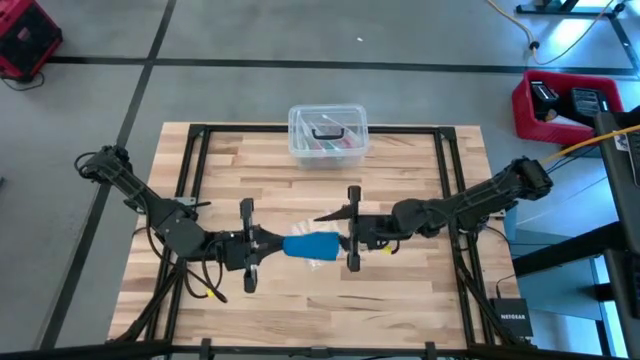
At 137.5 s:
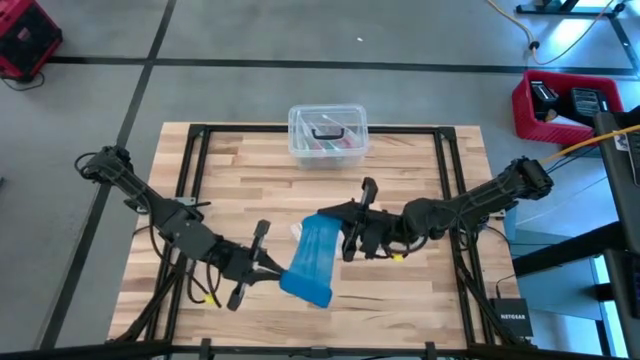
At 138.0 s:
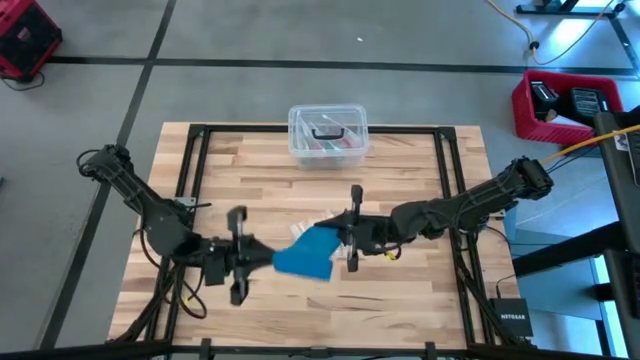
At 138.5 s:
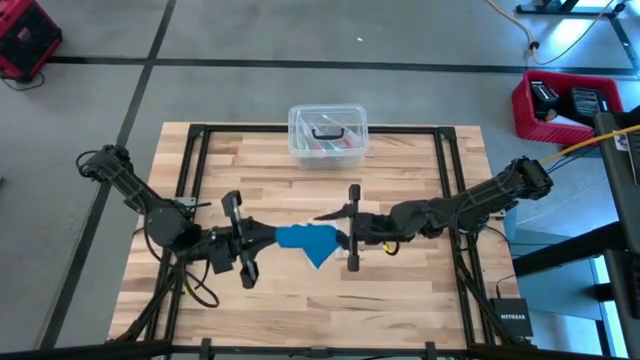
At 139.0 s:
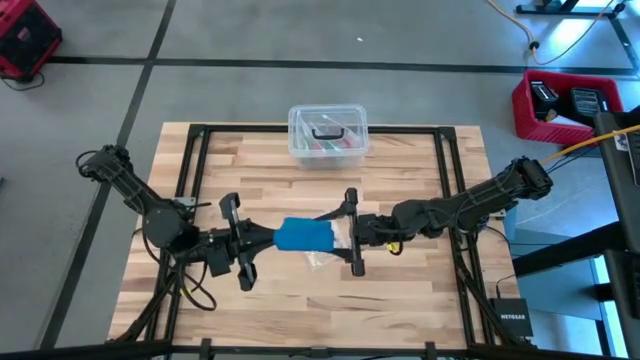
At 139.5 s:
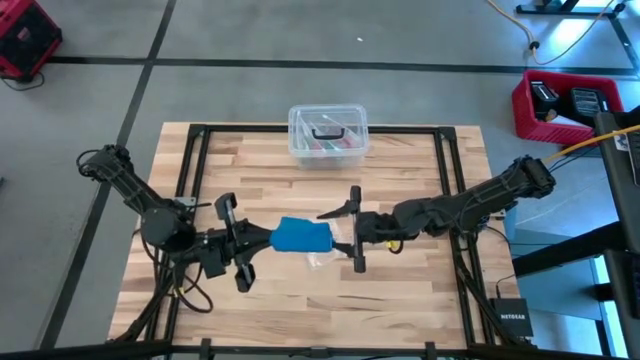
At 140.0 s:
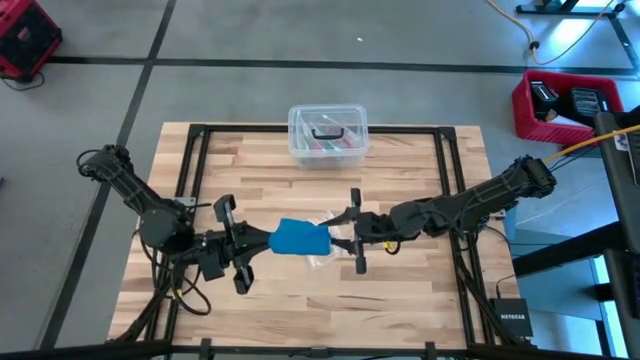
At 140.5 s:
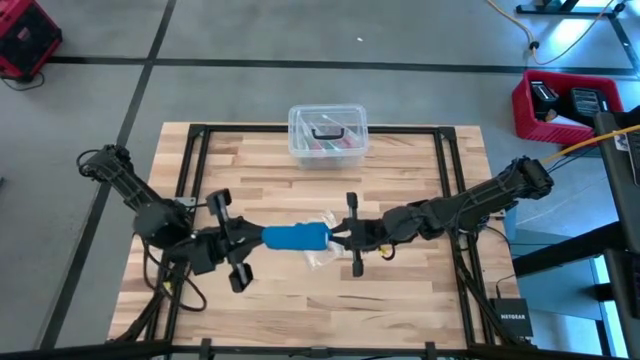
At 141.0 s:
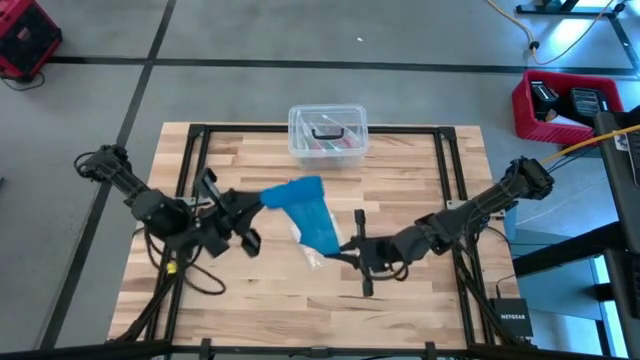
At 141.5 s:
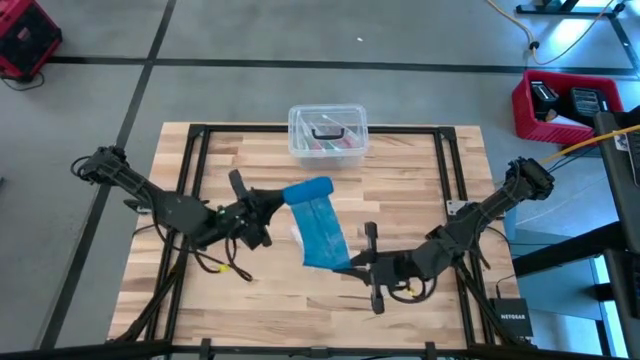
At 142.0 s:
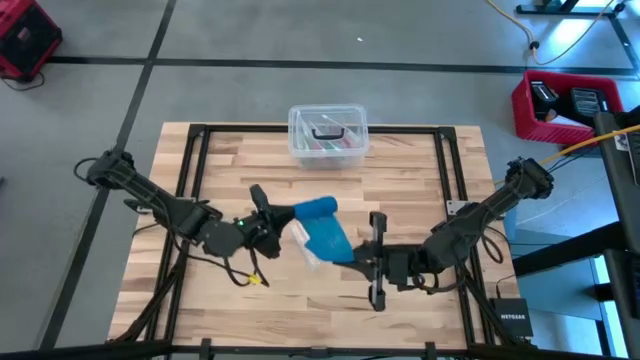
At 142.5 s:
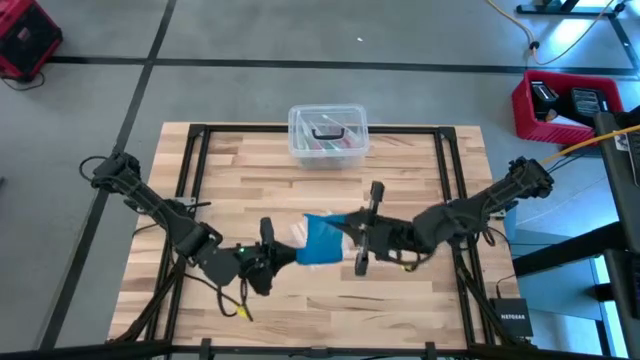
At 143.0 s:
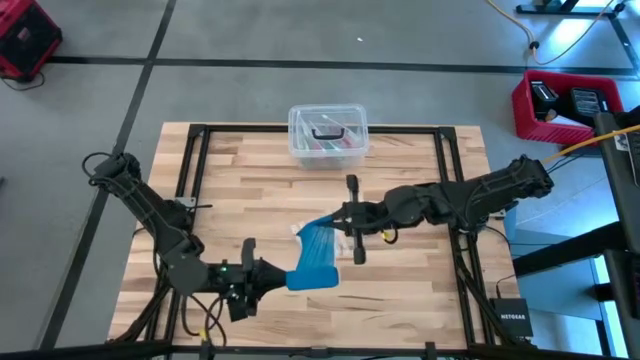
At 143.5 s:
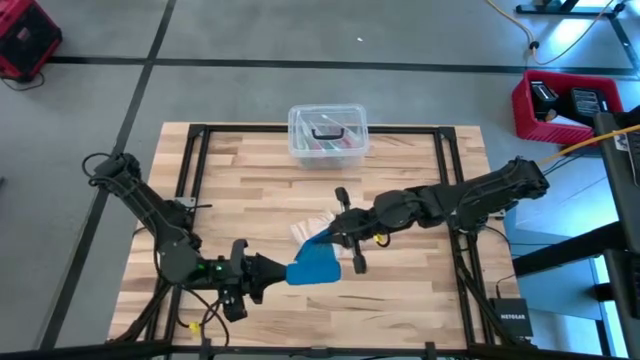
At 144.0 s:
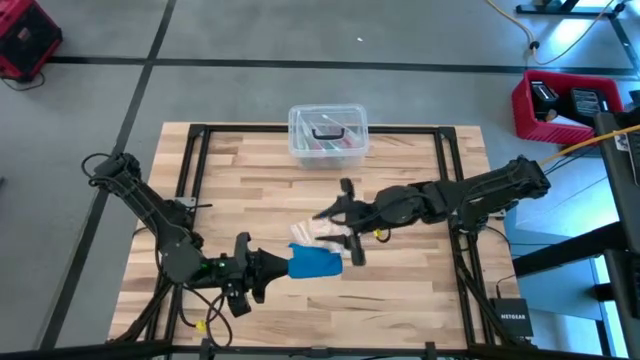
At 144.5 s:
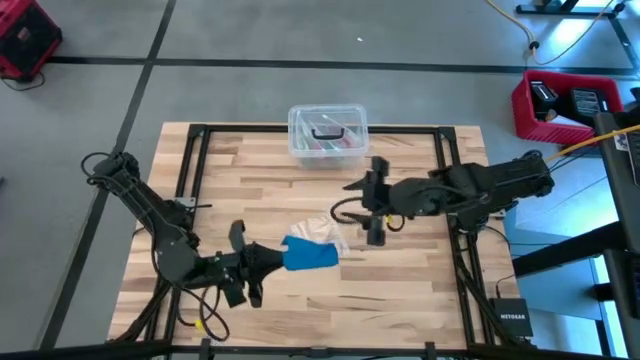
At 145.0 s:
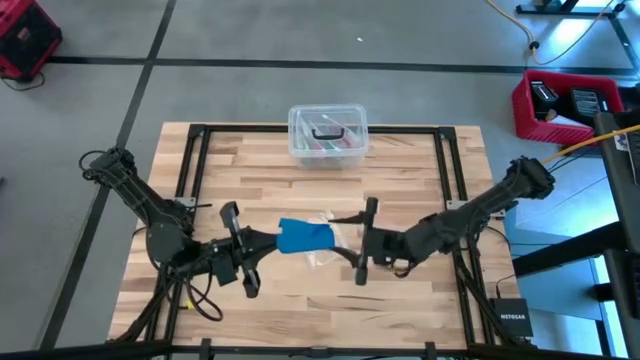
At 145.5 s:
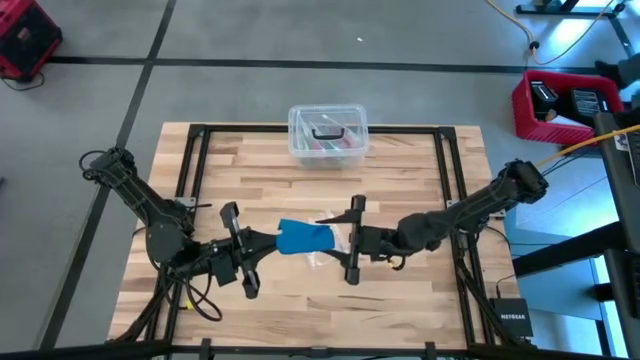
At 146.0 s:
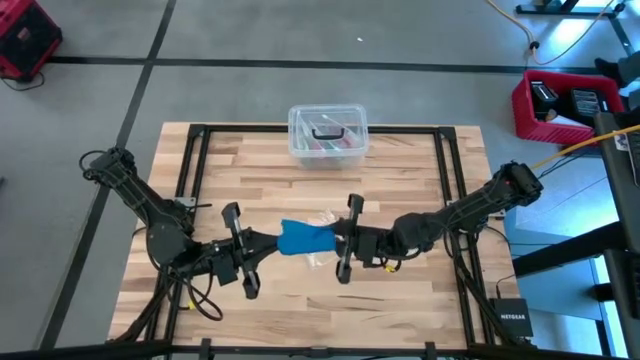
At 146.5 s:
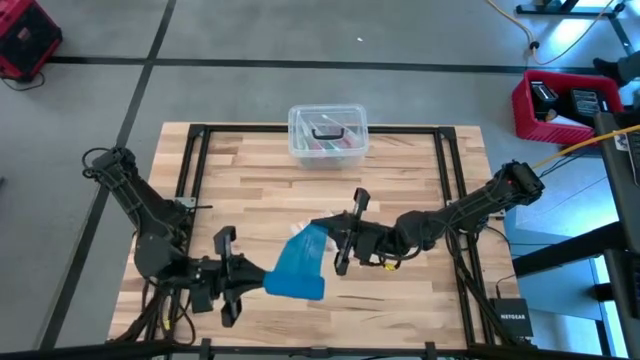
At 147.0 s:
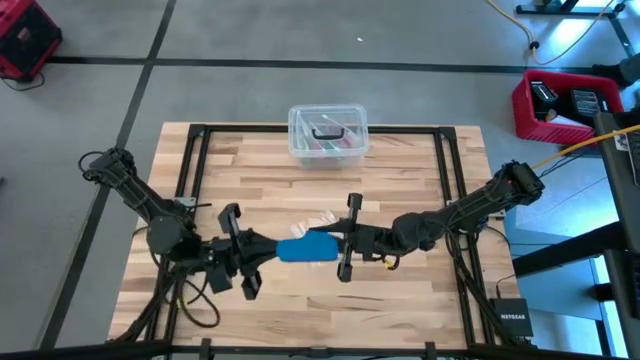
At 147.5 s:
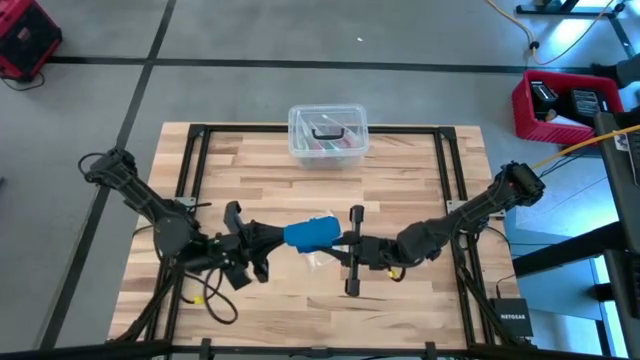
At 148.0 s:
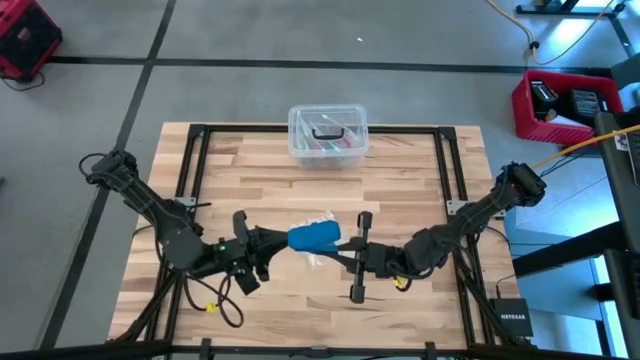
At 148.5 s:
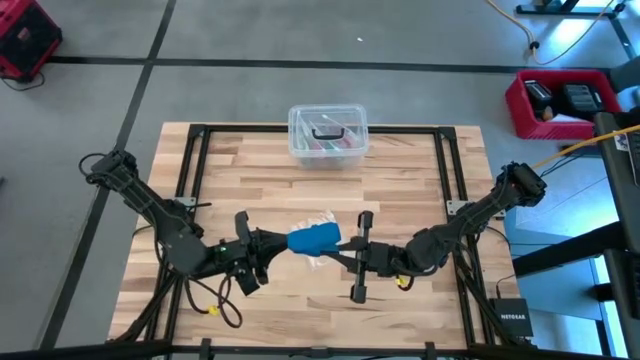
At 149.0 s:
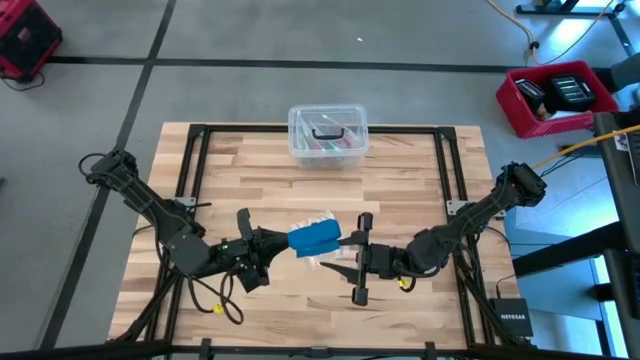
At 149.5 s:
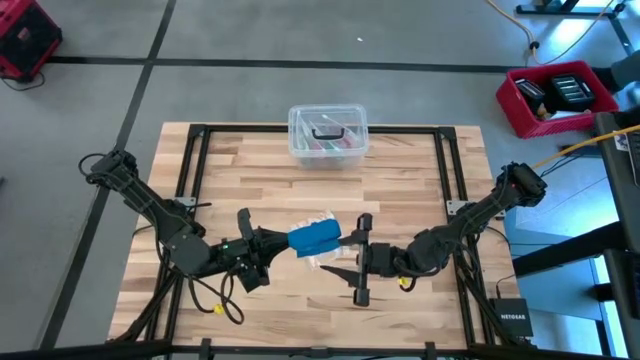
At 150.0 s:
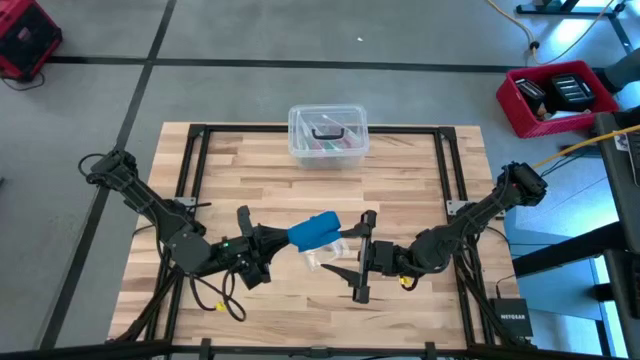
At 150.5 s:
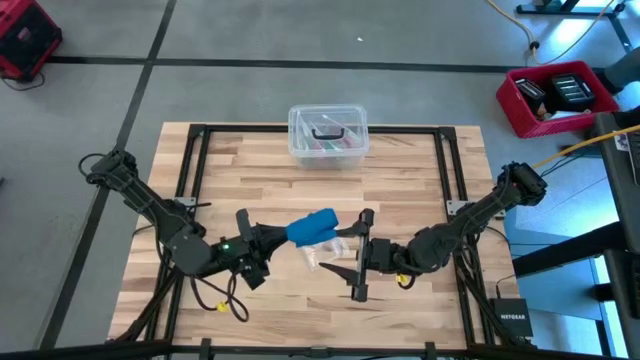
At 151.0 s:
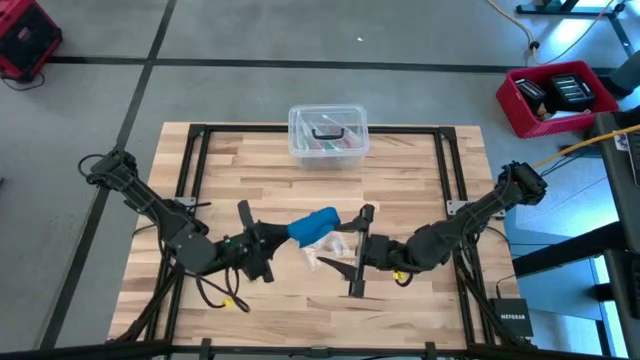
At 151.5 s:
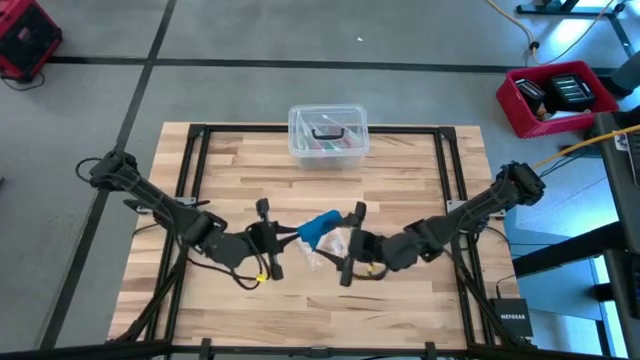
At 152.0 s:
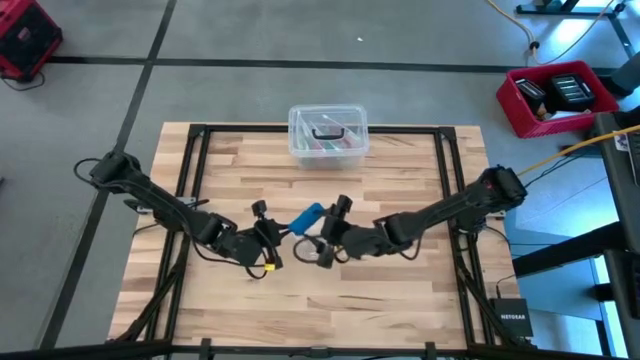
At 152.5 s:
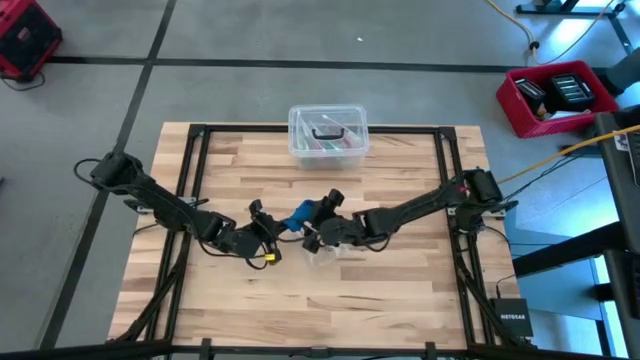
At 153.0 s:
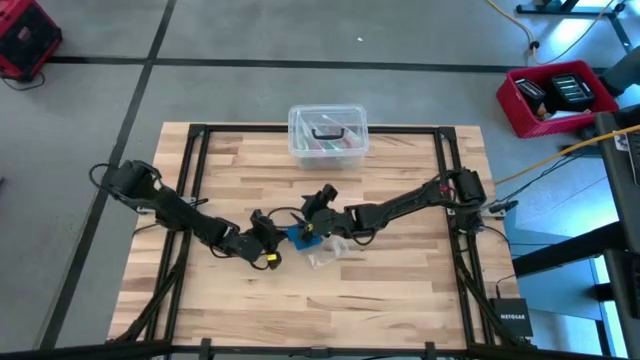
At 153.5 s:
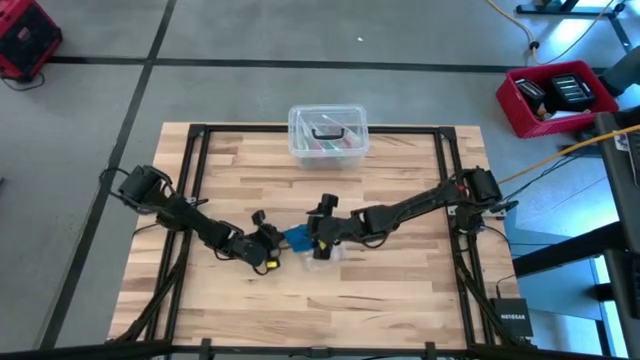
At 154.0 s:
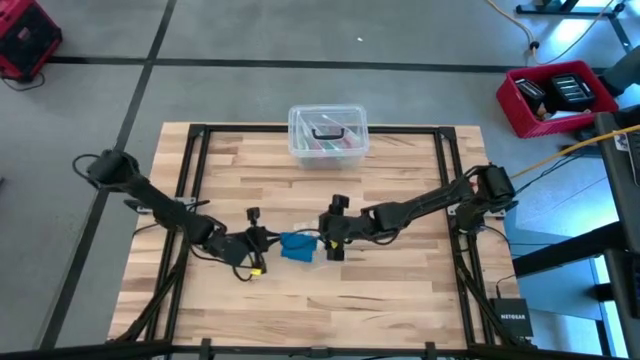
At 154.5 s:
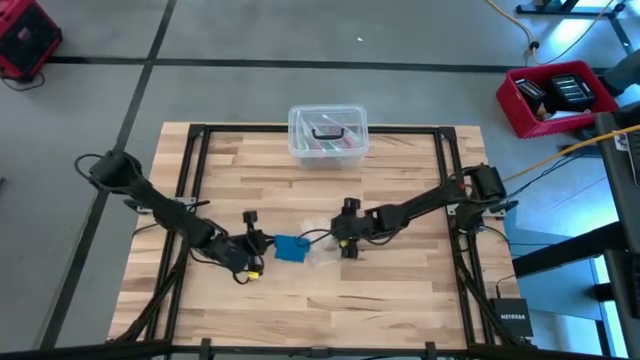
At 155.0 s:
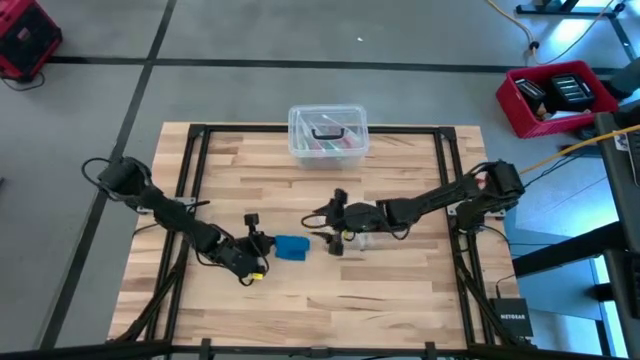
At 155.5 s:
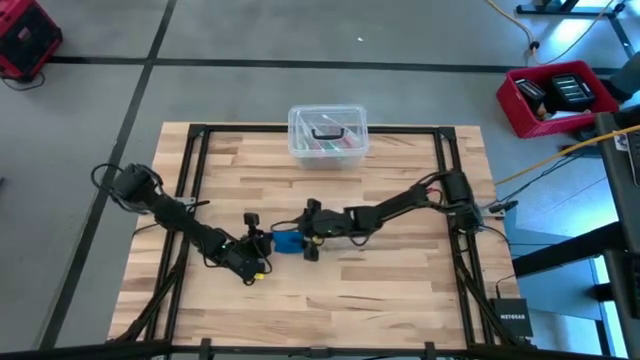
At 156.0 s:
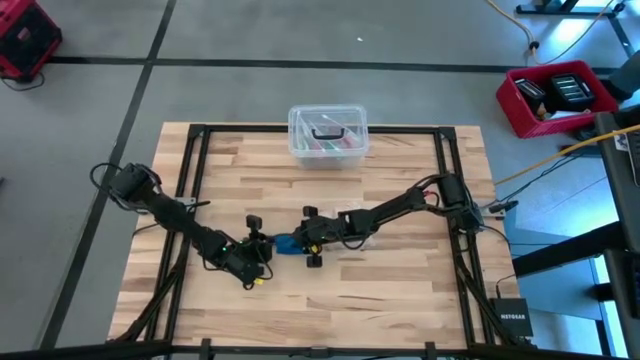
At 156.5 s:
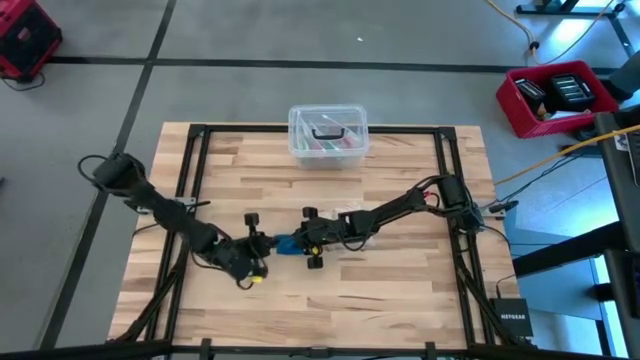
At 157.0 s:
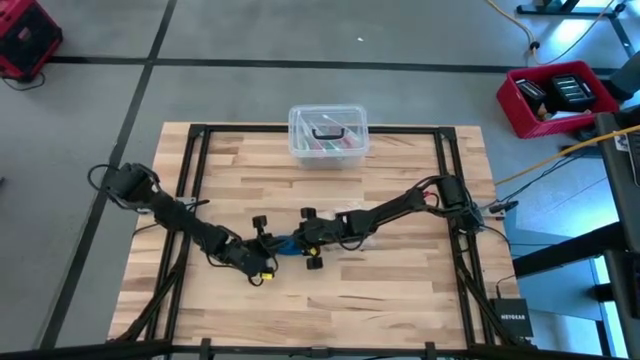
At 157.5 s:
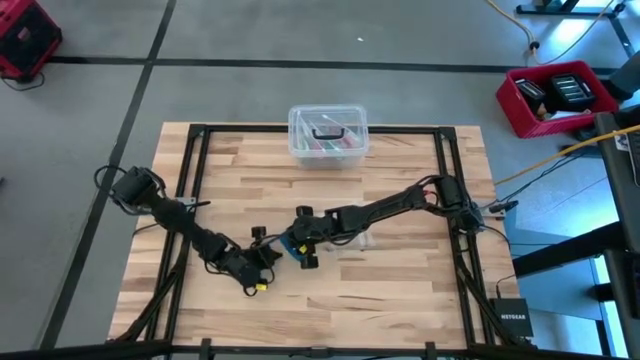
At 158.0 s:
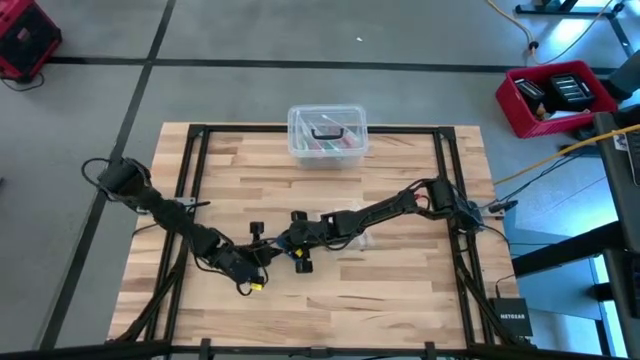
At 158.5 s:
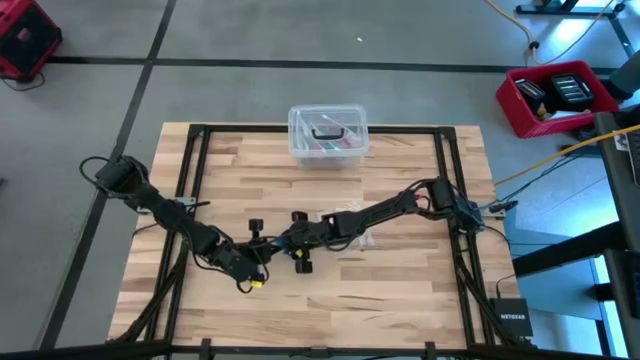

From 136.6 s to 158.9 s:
Task: Roll bandage
Roll the blue bandage
